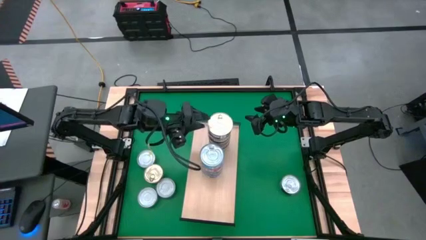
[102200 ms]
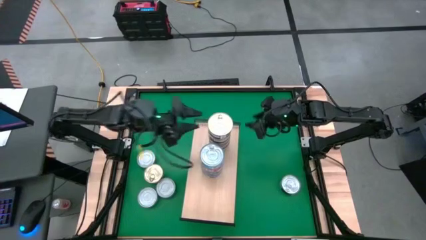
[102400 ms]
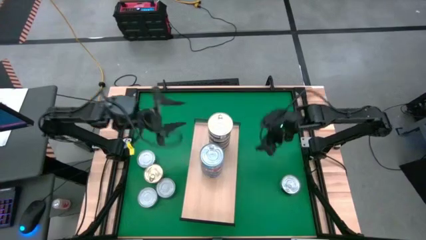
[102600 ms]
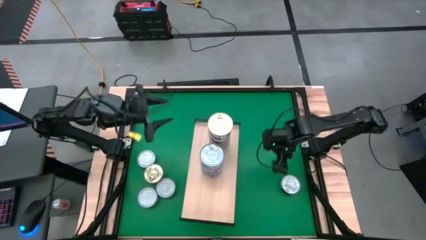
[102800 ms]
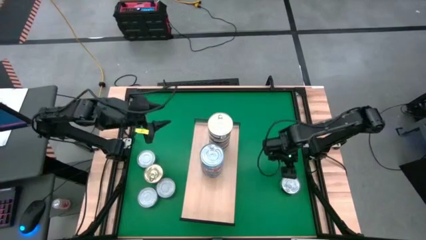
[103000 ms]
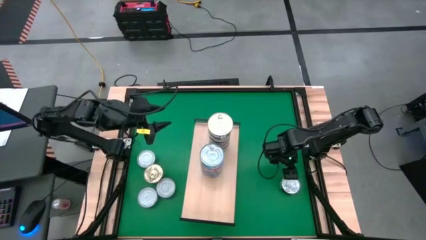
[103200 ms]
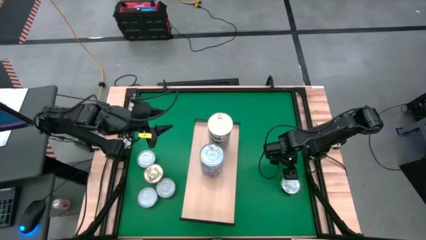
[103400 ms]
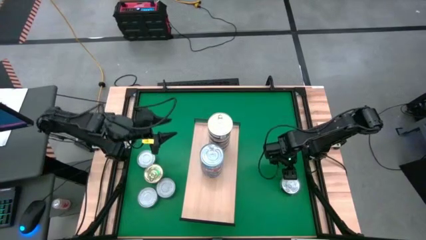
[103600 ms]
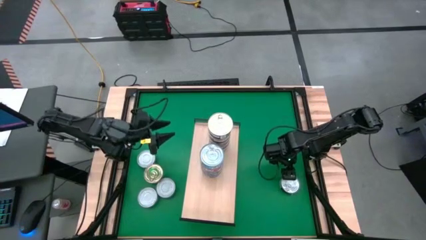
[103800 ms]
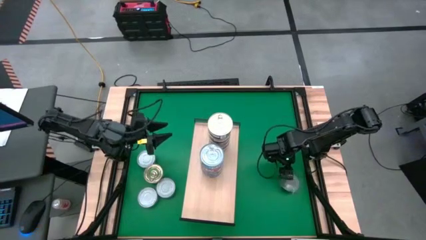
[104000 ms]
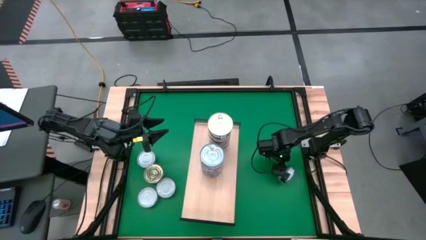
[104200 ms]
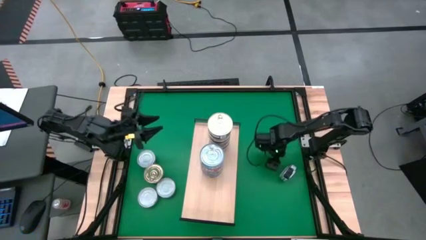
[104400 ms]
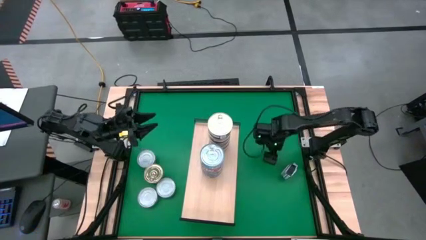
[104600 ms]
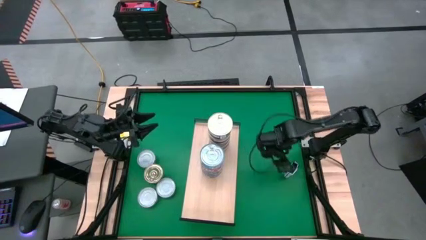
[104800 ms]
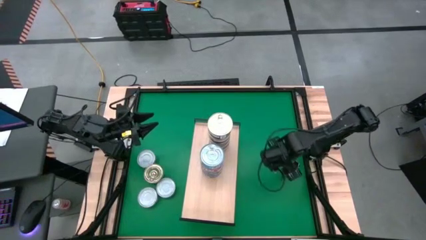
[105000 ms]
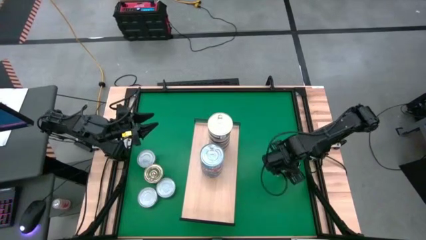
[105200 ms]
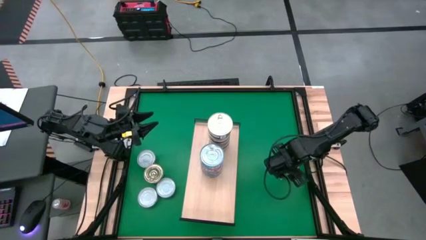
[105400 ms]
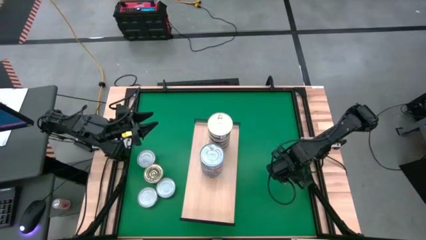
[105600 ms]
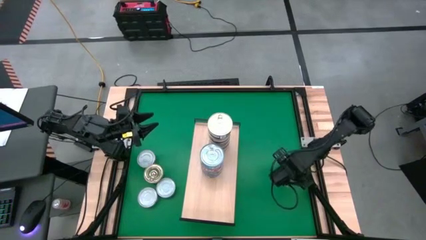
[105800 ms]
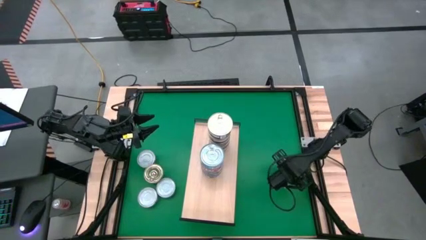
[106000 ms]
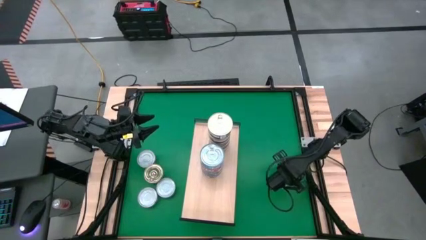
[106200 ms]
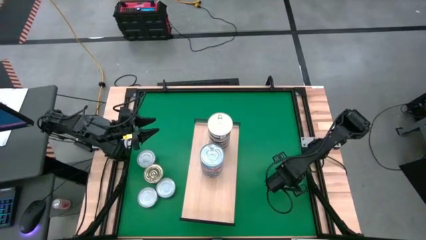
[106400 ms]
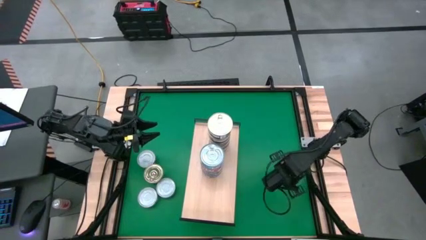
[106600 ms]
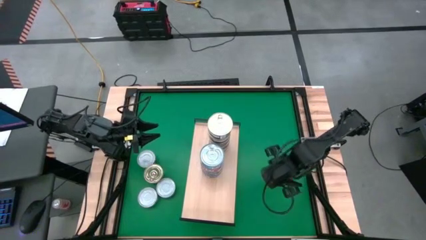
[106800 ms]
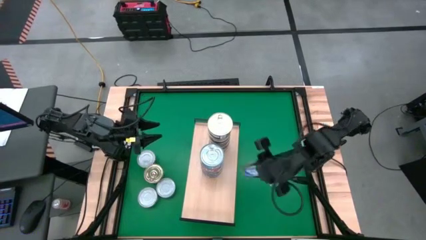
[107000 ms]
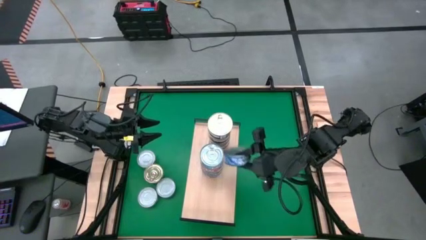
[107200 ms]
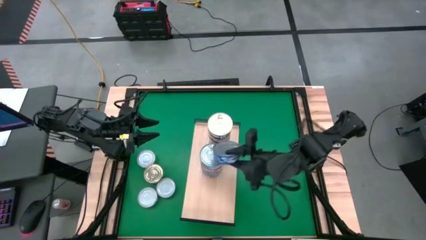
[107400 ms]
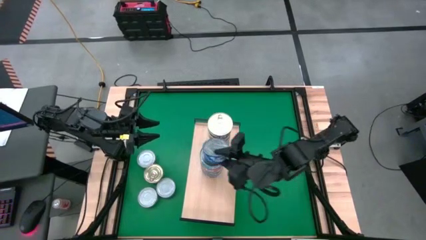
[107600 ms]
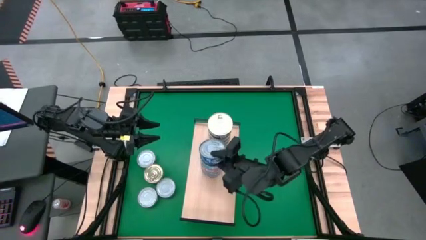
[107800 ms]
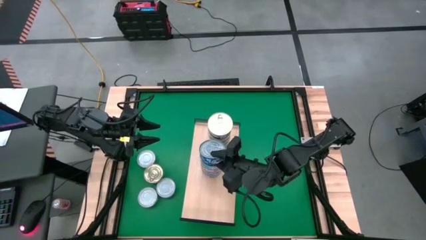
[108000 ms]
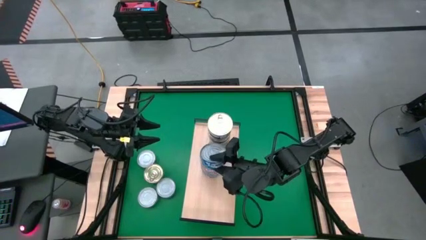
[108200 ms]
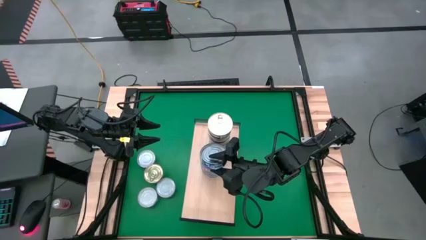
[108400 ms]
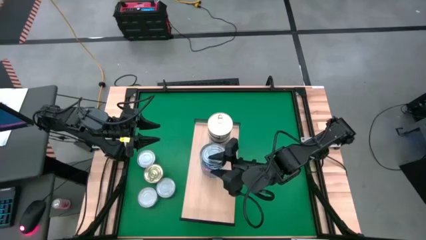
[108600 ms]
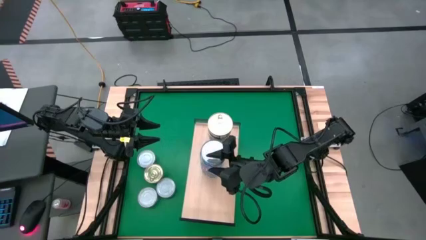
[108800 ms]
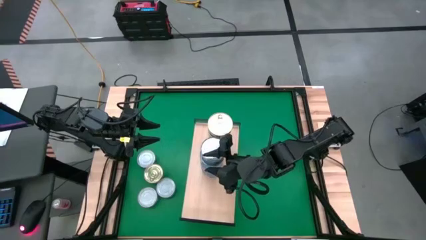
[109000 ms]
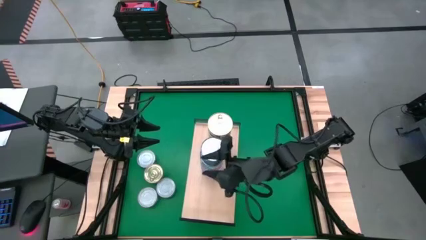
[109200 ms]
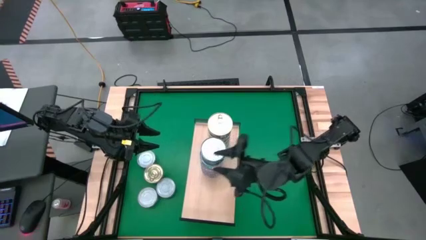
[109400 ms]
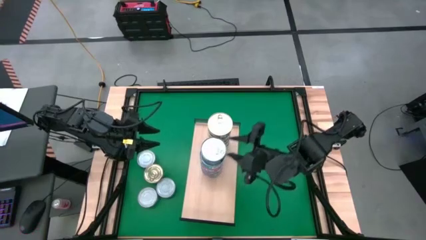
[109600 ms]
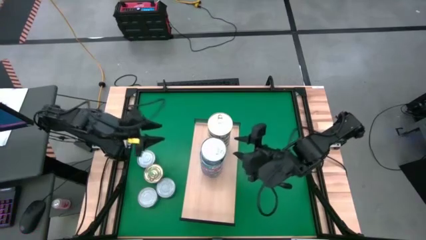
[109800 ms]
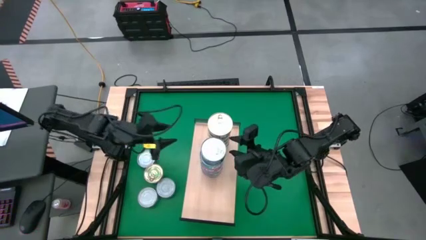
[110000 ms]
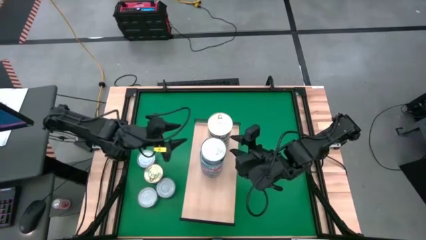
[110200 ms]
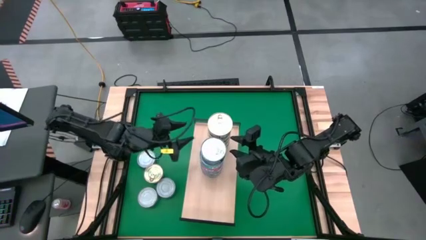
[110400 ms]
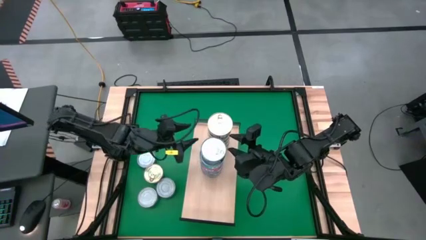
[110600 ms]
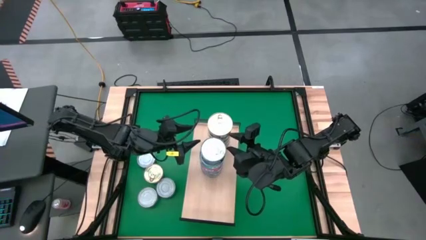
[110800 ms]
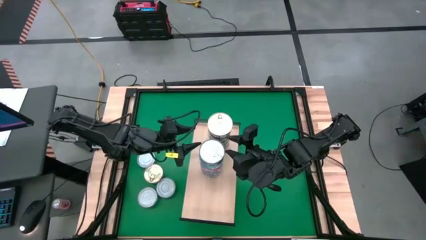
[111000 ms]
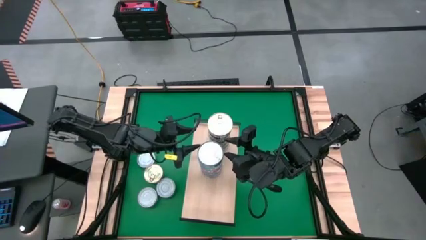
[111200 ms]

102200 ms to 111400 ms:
Task: Stack canned seafood by type on shelf
Stack the blue tuna can on top of the yellow blue tuna can on the shelf

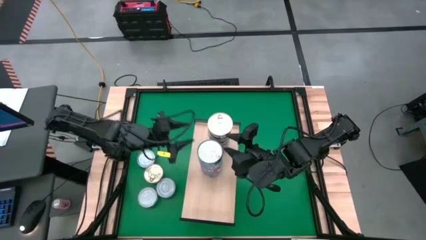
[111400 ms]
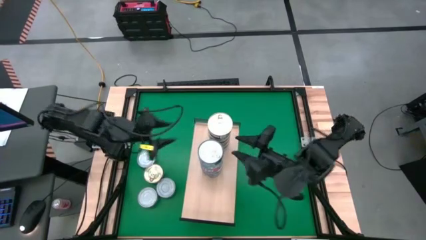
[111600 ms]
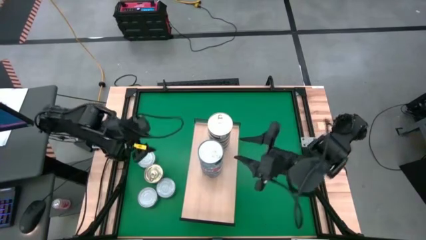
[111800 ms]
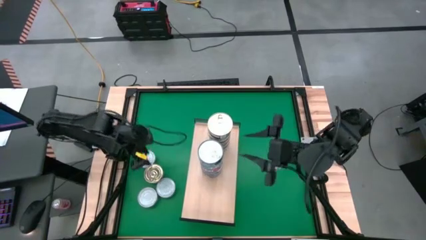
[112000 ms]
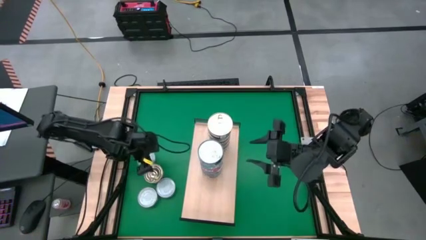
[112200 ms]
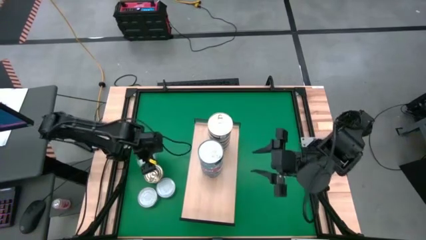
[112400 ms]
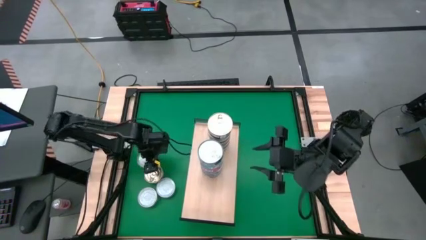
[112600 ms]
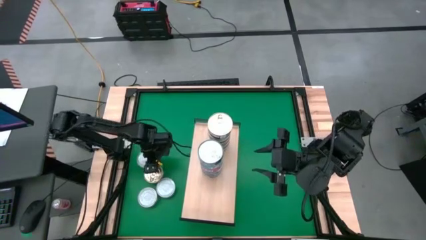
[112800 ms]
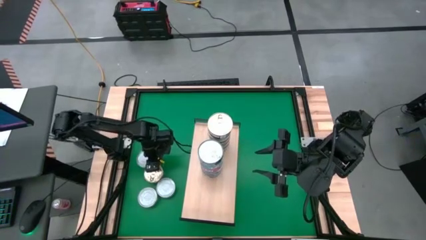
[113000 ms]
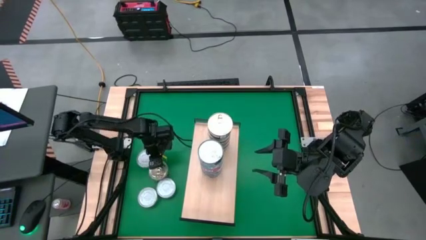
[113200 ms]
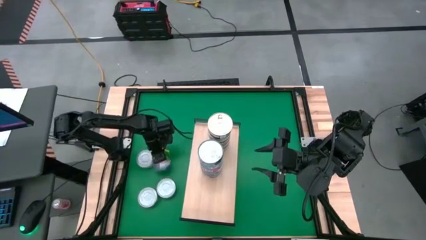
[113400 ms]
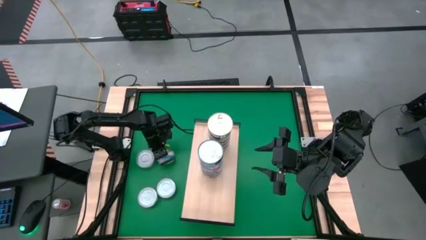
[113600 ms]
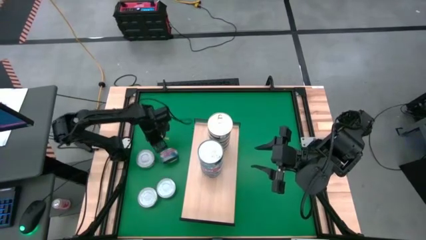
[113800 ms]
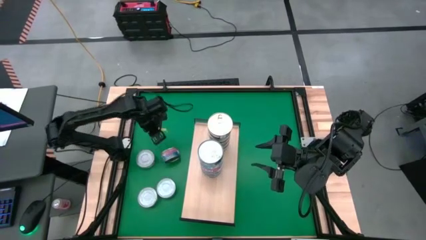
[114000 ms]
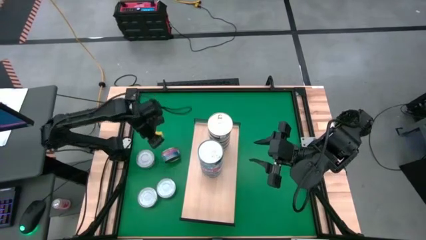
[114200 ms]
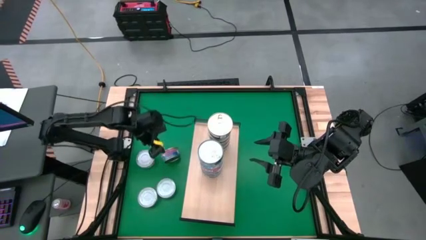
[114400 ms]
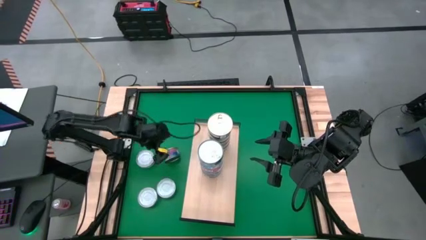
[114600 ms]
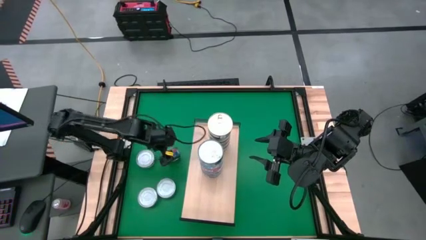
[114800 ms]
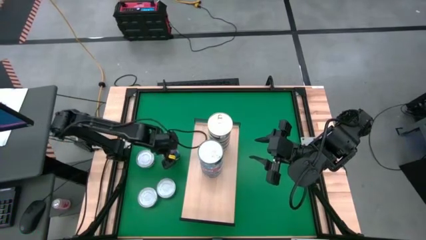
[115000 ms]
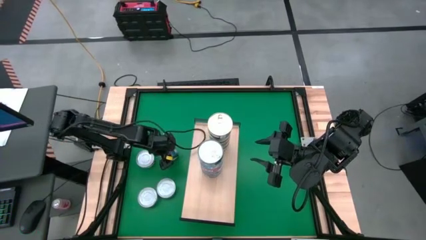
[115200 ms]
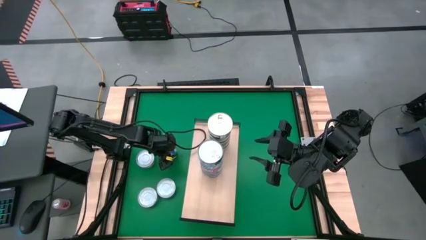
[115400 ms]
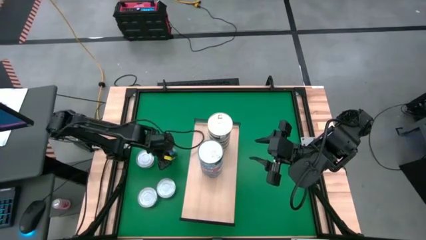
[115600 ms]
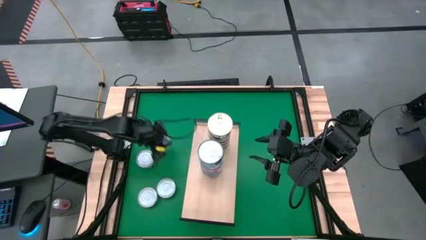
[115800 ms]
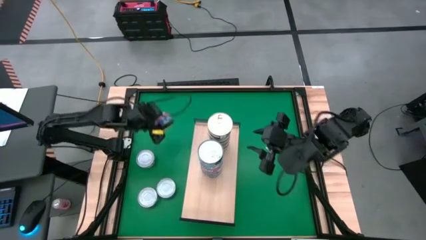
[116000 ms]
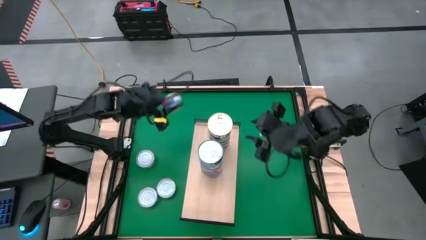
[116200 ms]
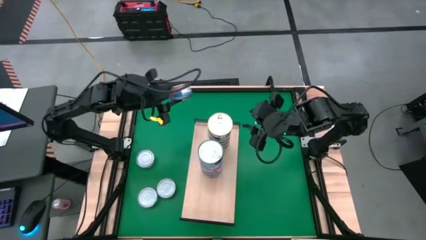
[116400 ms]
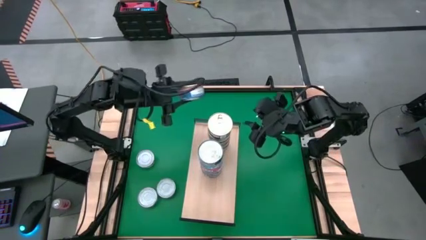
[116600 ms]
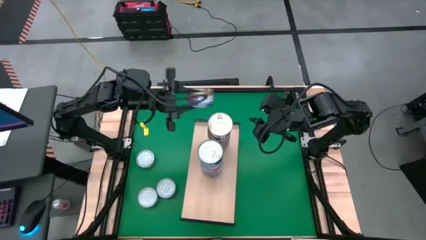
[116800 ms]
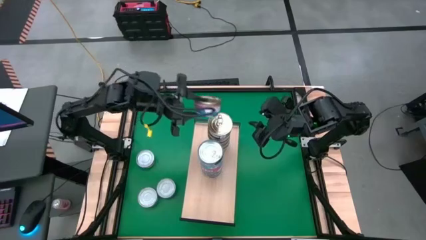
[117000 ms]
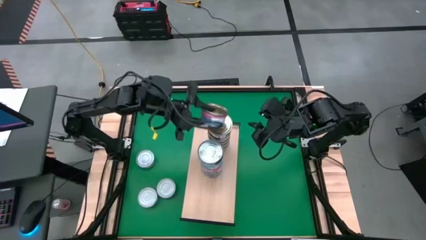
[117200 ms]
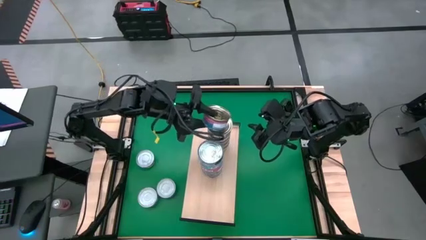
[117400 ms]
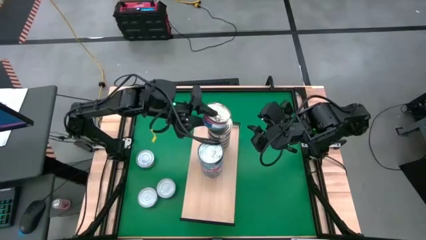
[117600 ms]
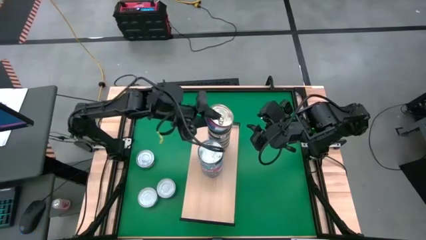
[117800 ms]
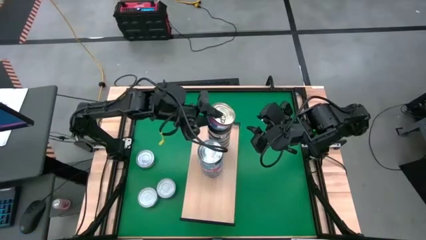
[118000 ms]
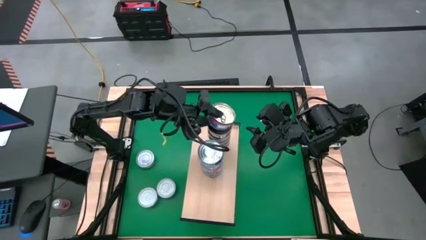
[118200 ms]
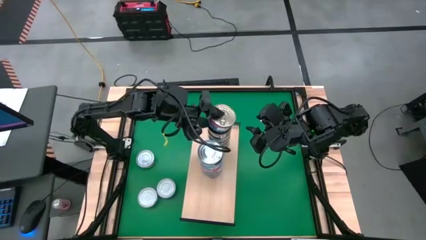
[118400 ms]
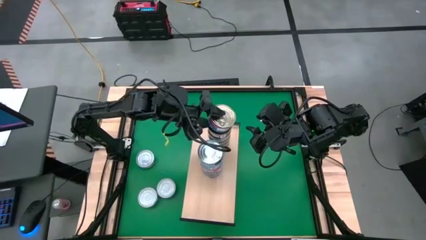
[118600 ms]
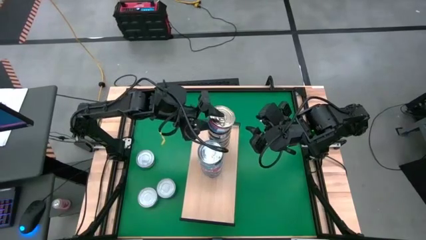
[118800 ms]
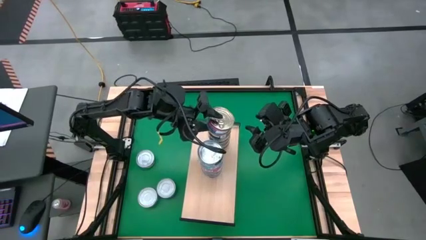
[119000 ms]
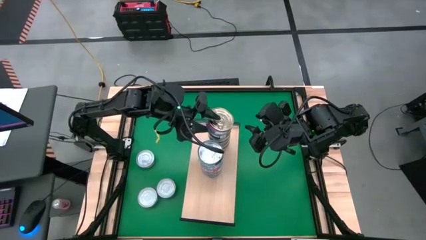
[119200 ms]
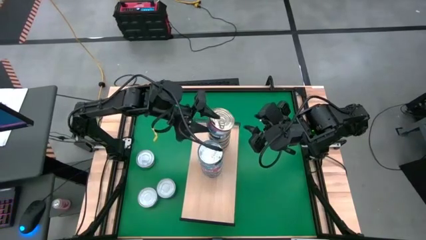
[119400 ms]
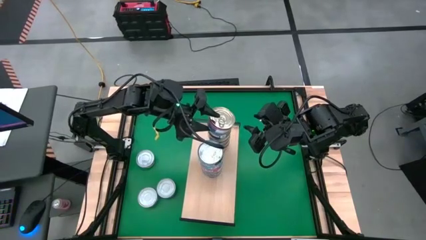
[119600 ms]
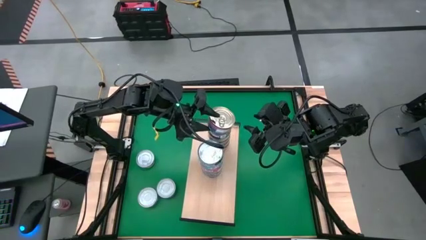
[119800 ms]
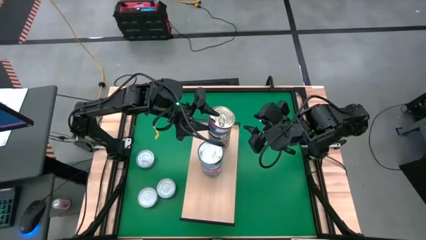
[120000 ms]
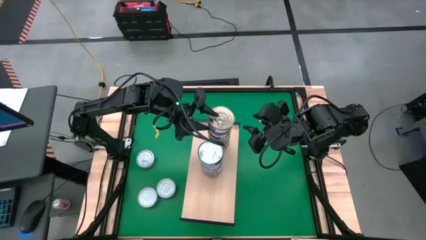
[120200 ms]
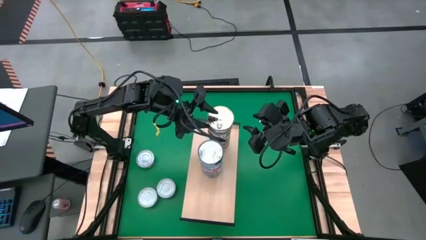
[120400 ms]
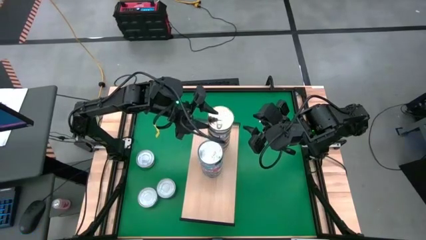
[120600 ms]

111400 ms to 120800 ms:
Stack the blue pink tuna can on top of the other blue pink tuna cans on the shelf
